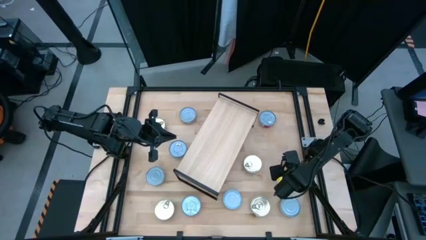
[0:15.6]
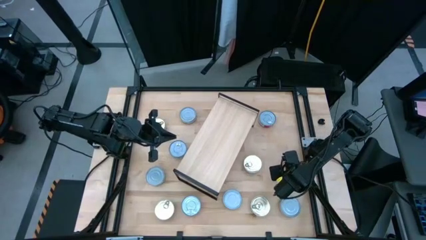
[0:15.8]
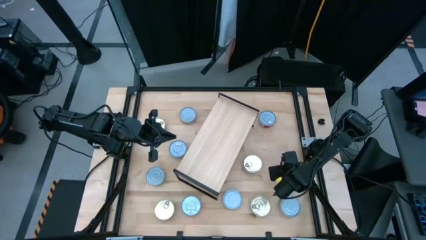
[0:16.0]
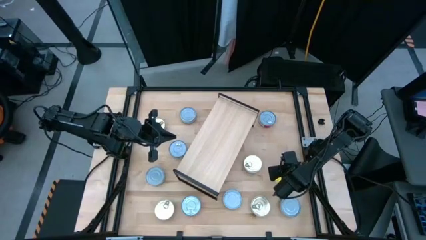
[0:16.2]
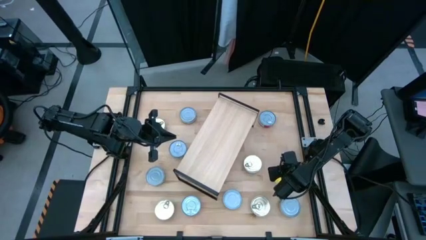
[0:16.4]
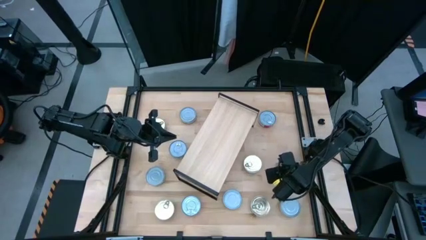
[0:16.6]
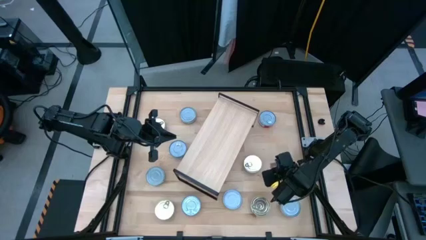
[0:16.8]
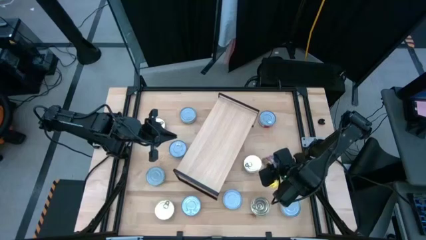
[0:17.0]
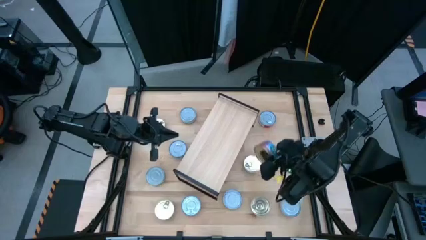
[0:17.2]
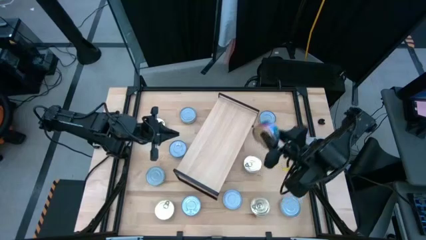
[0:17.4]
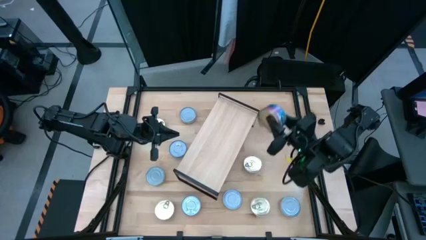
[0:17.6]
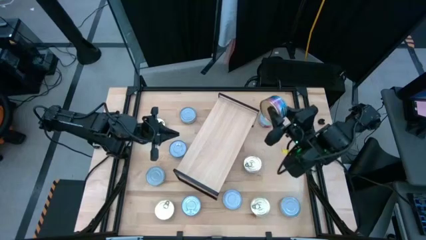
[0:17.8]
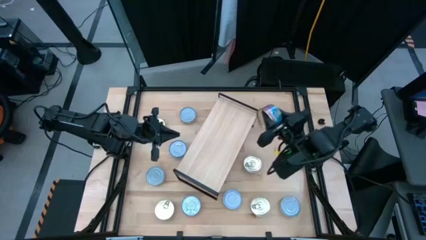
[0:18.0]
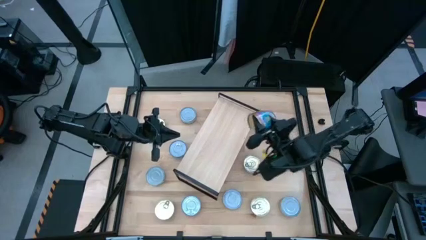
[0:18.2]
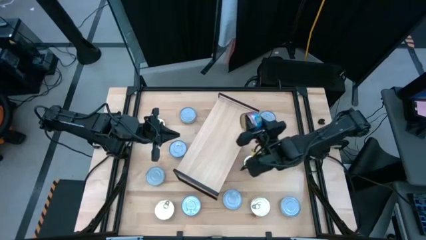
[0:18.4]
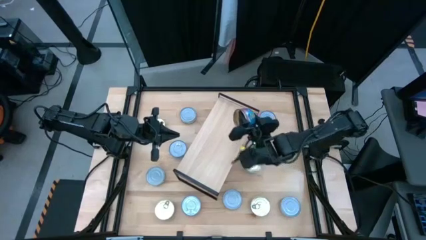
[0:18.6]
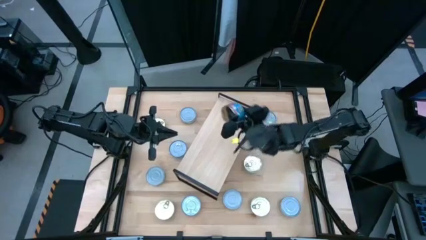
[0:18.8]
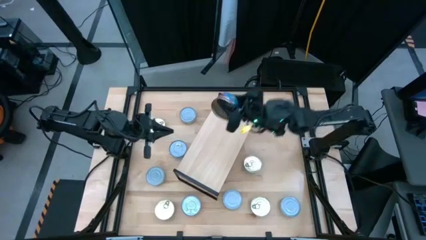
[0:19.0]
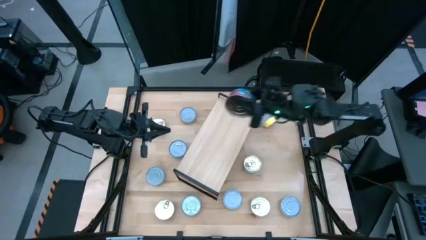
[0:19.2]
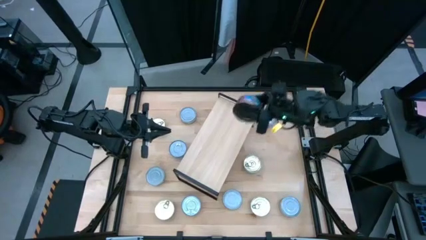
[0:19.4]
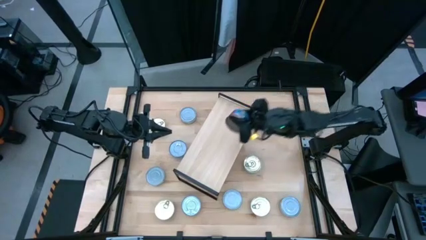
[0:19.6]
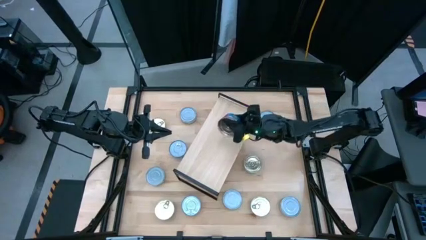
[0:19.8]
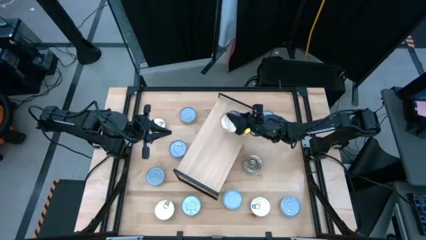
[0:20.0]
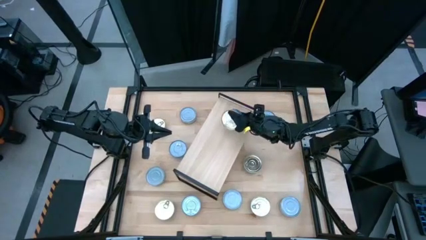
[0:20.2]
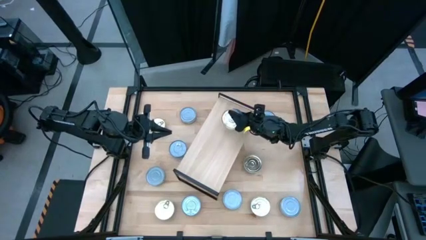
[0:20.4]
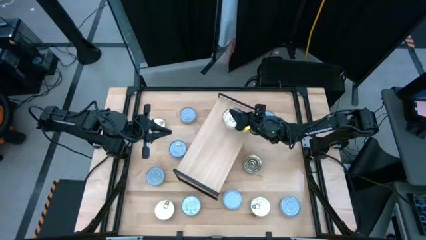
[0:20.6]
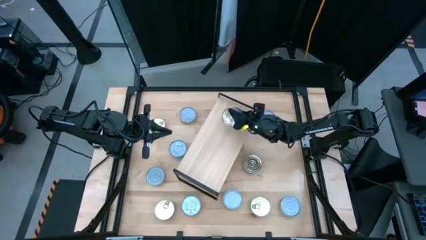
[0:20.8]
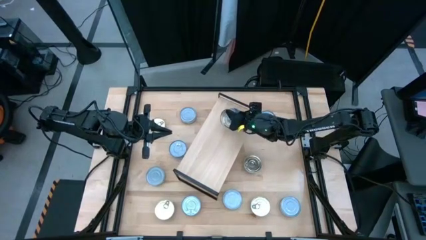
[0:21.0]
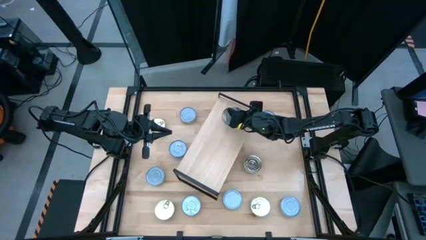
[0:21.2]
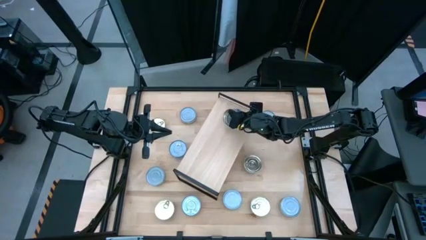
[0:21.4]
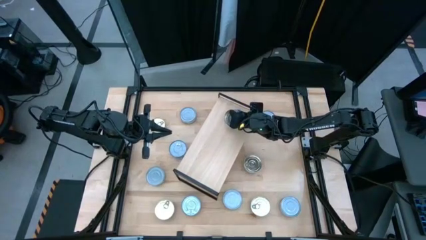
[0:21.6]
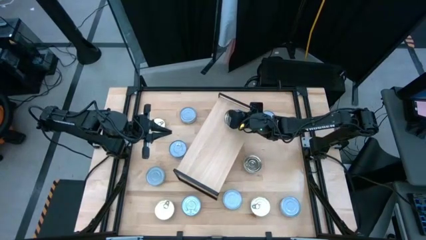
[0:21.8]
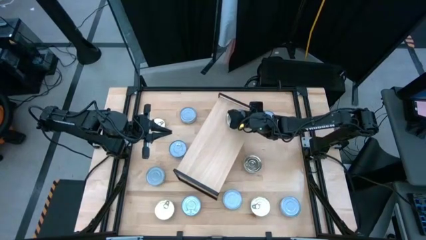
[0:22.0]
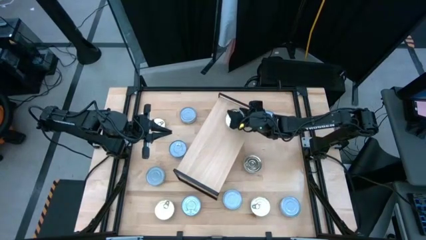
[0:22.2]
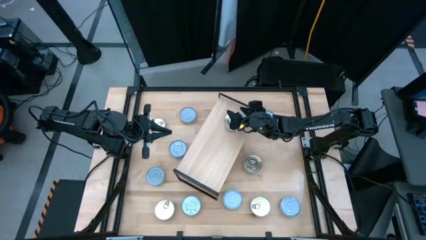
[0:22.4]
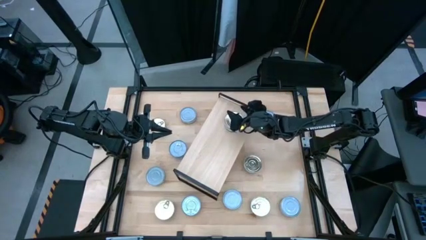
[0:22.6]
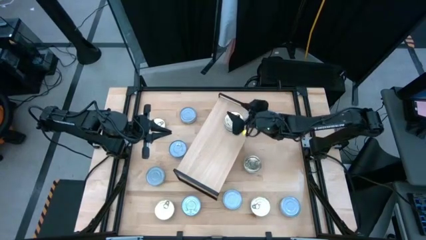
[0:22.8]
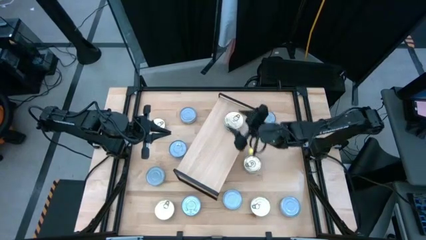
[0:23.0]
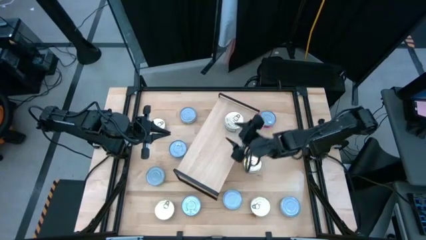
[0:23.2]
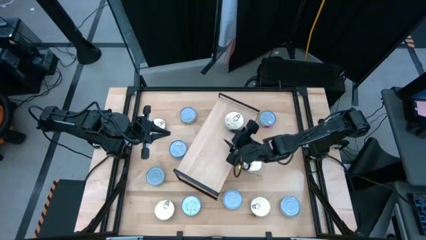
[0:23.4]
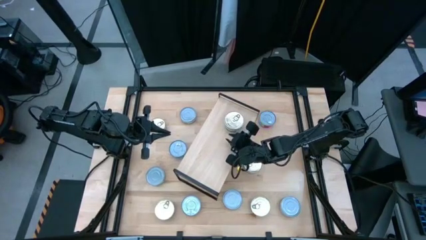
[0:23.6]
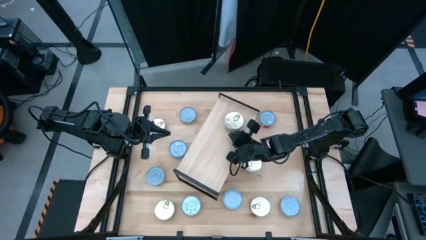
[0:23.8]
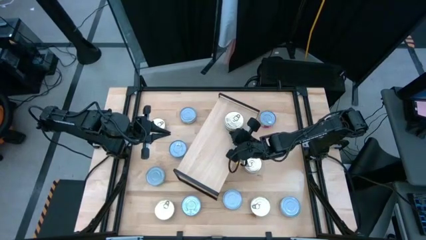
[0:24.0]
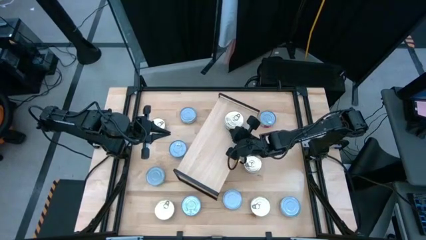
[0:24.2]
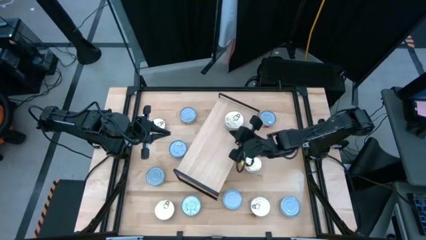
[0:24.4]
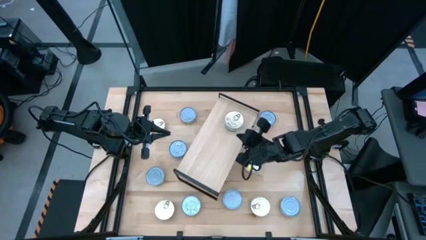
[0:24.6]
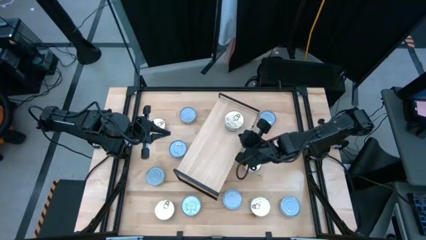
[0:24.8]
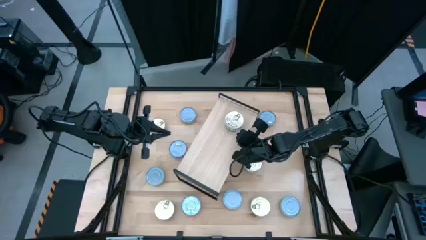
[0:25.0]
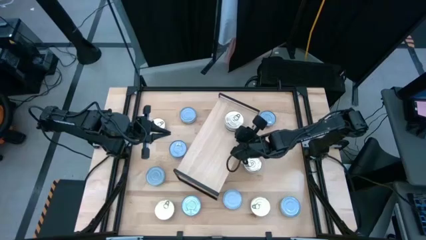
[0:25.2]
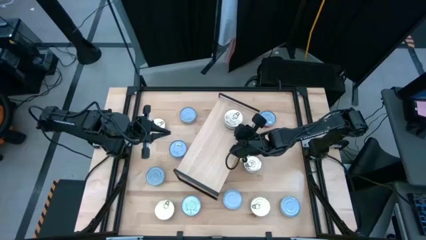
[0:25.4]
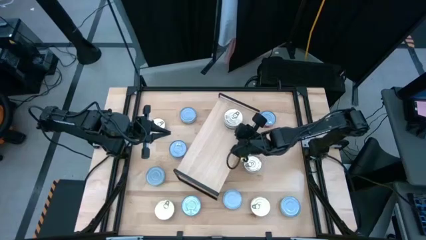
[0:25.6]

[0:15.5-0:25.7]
Task: Stack canned seafood by type on shelf
Put the blue tuna can on the shelf

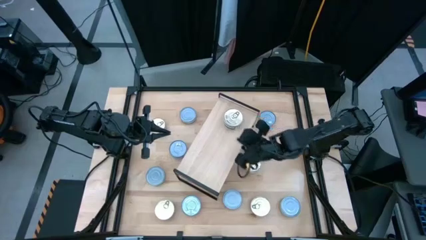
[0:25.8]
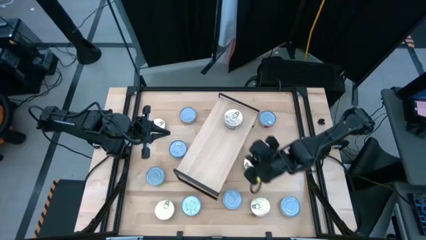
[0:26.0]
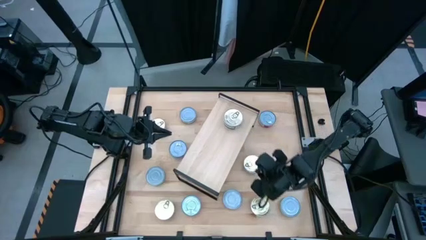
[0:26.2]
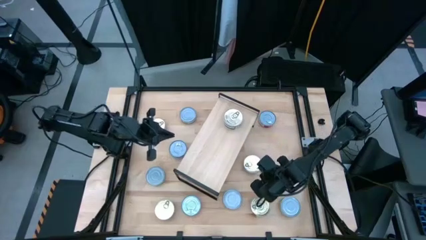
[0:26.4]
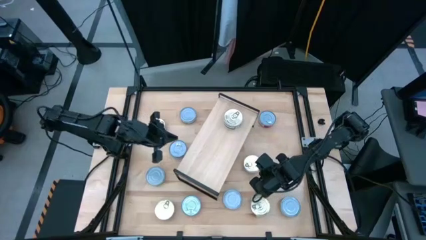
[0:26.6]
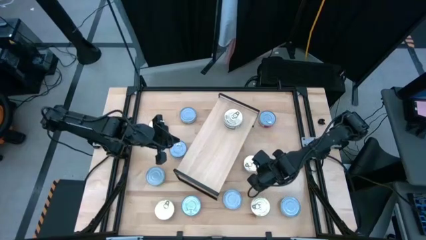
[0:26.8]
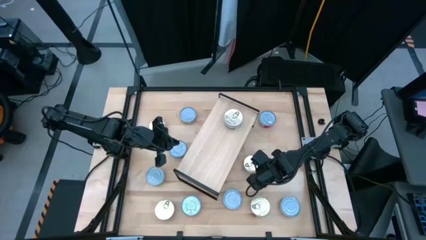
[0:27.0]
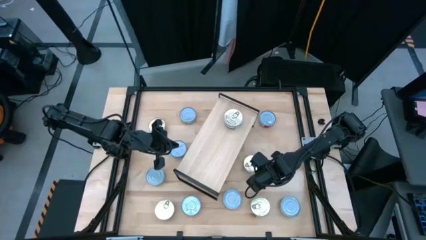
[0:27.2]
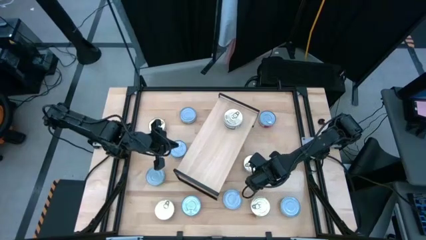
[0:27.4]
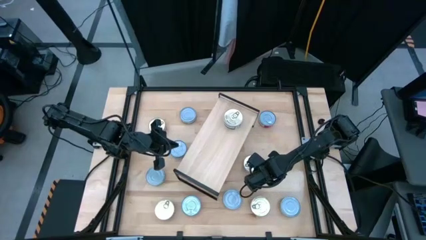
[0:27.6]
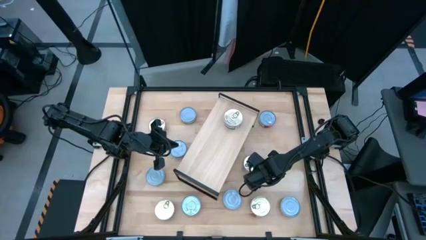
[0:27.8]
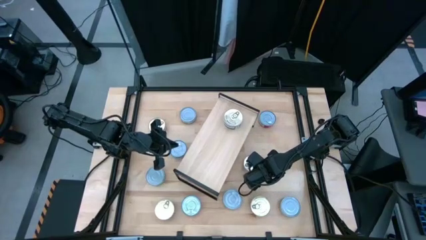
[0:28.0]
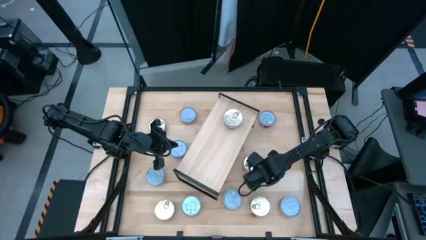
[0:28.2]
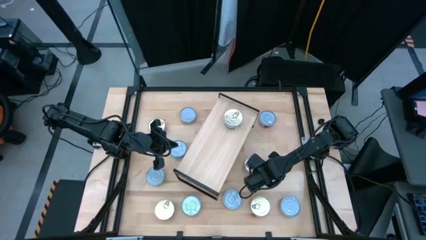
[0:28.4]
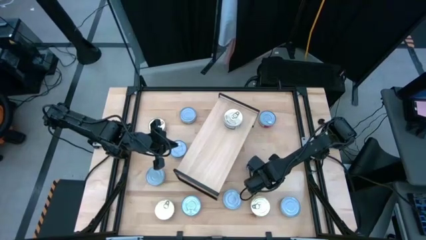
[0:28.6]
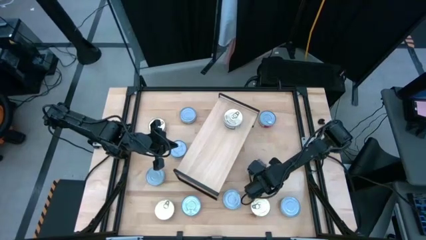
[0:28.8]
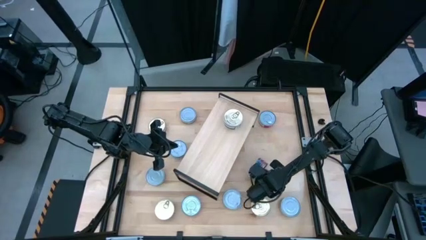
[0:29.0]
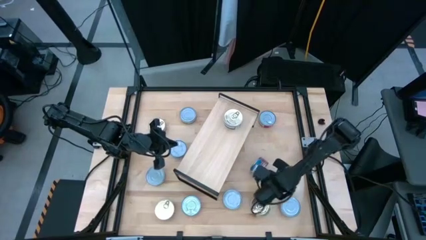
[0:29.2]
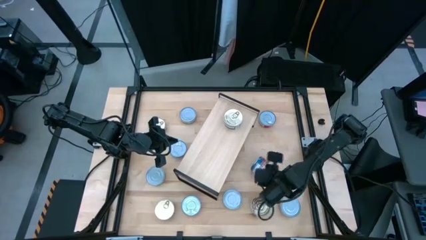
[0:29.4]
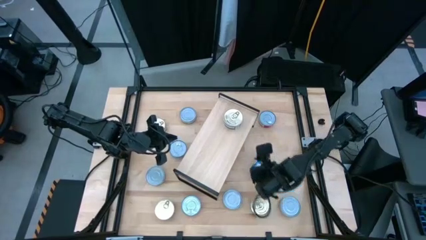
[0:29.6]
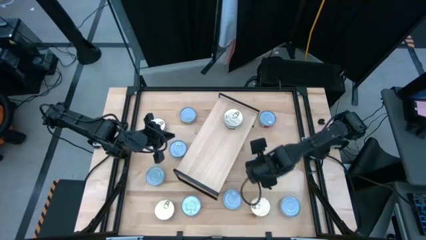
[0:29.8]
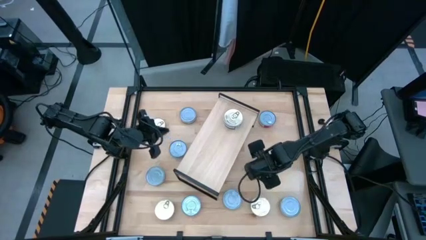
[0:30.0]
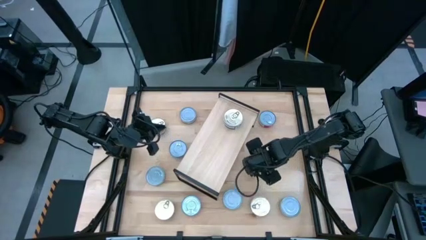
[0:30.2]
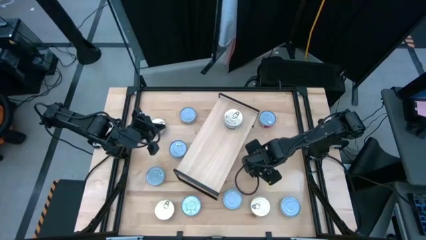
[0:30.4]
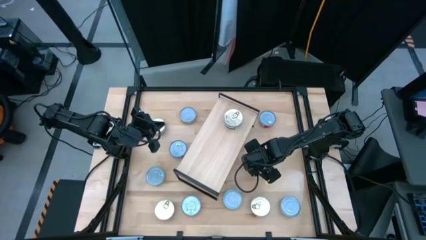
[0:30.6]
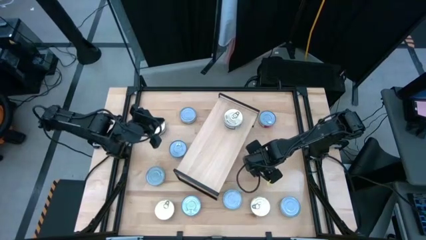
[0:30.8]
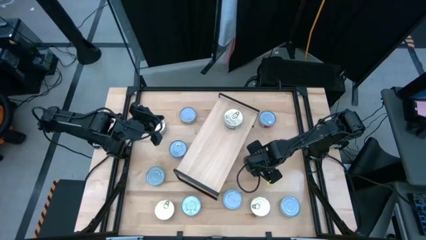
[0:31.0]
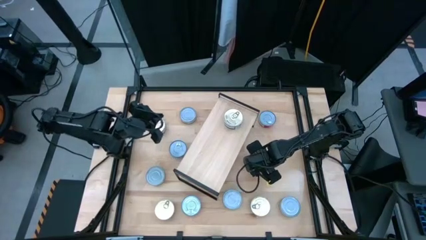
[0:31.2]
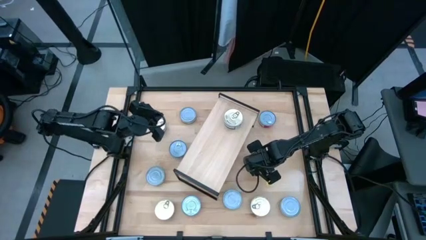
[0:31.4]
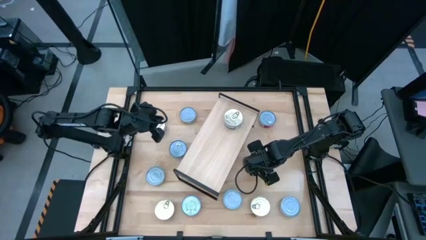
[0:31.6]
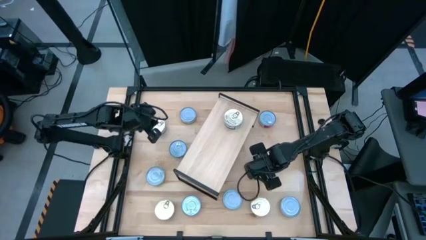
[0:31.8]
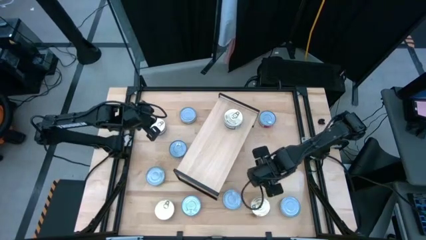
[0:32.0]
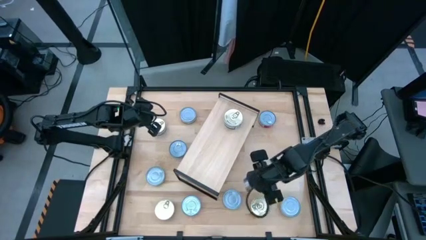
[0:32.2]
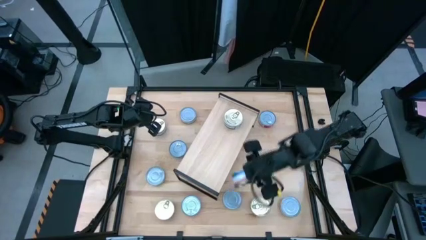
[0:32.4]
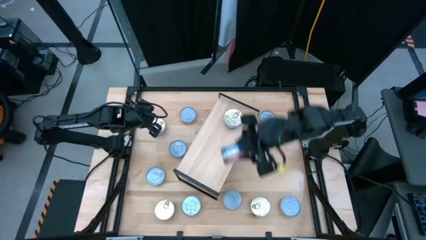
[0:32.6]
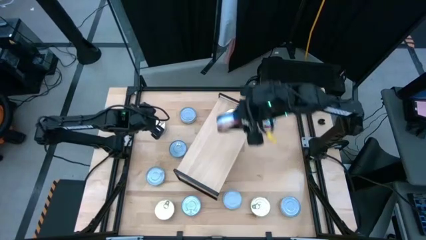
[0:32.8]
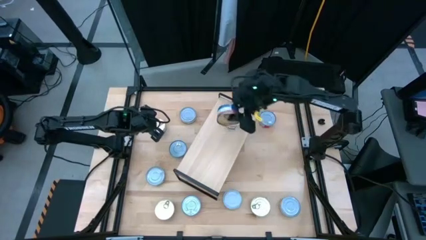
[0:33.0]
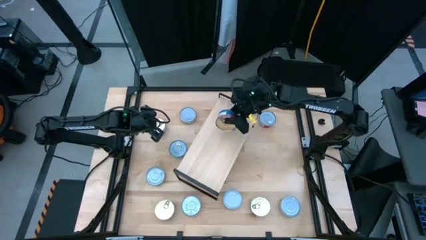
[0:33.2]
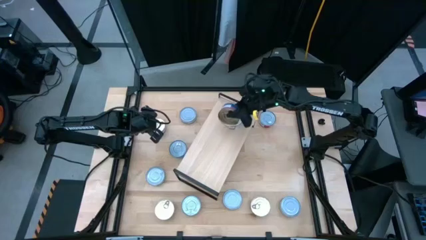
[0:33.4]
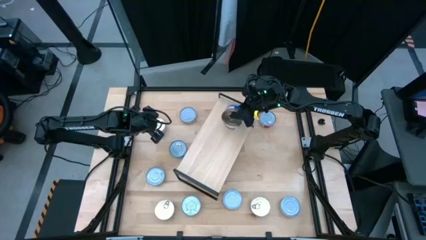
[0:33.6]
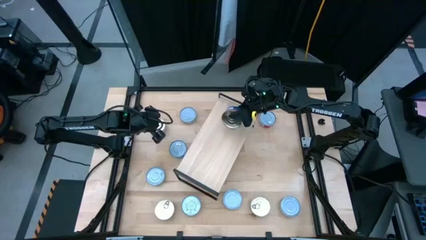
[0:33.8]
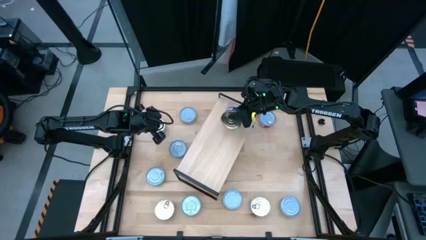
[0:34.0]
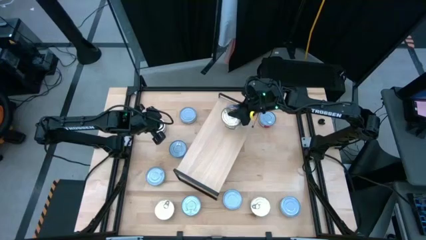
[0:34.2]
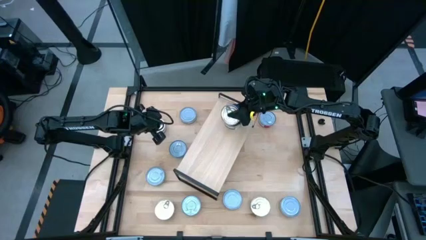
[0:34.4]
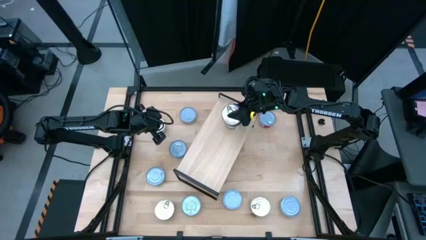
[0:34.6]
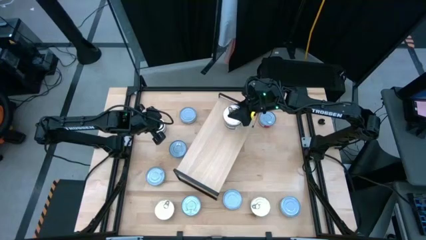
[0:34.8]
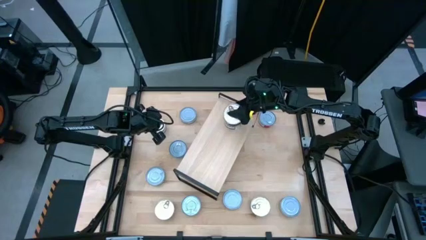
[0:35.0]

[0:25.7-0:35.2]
Stack the blue tuna can on top of the blue tuna can on the shelf
